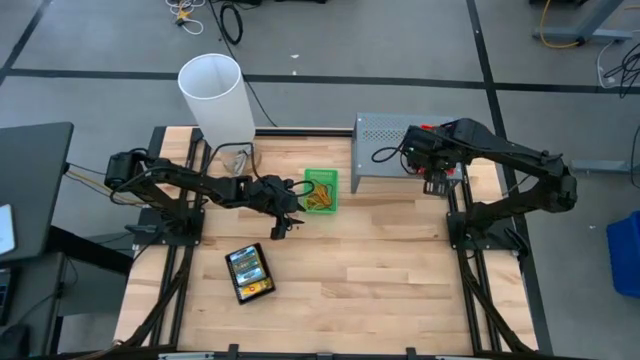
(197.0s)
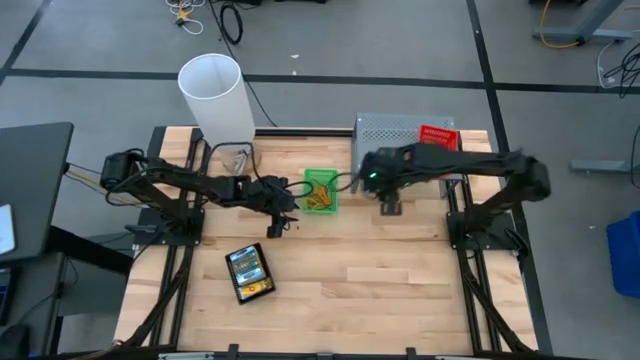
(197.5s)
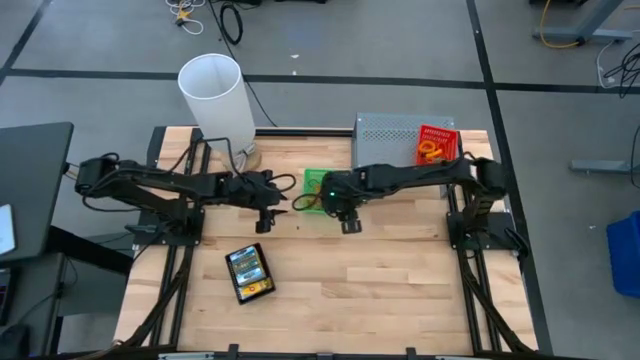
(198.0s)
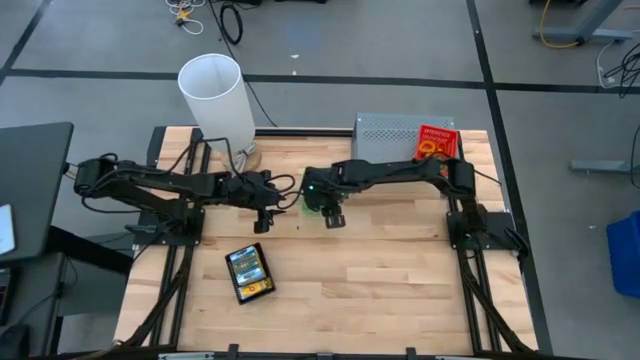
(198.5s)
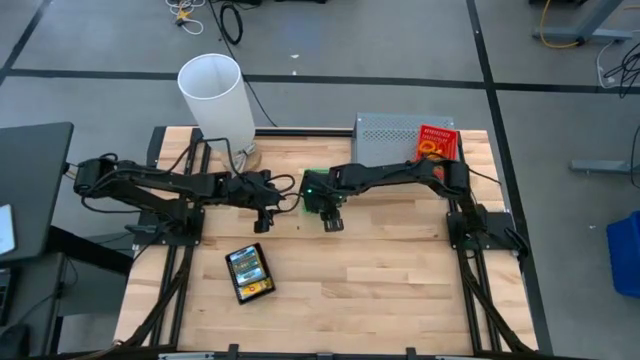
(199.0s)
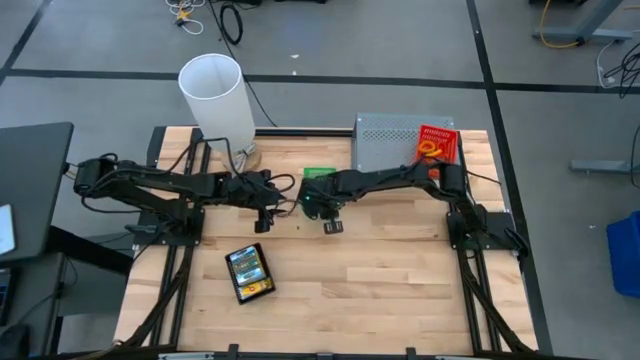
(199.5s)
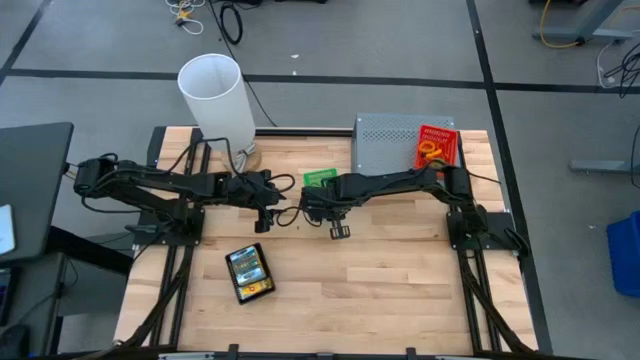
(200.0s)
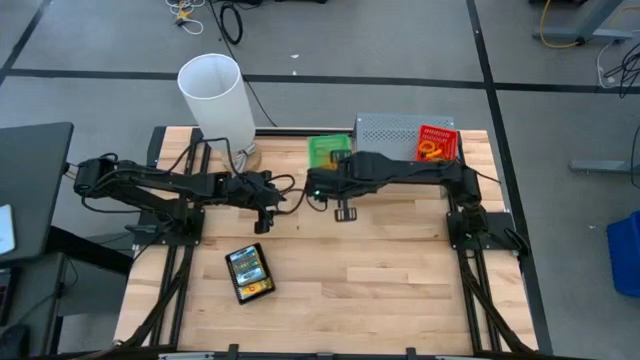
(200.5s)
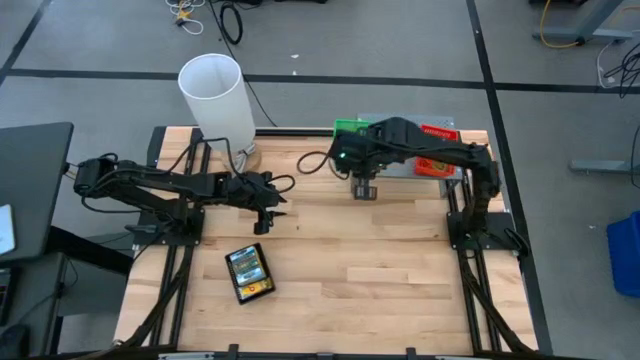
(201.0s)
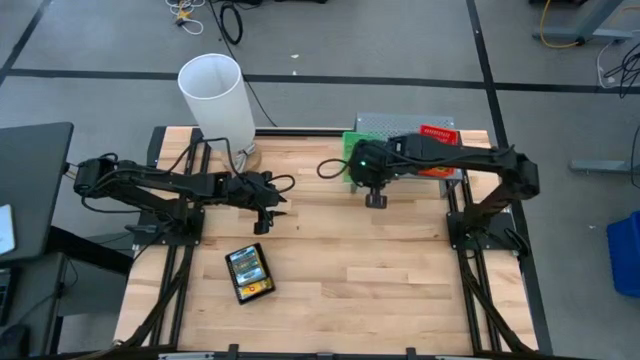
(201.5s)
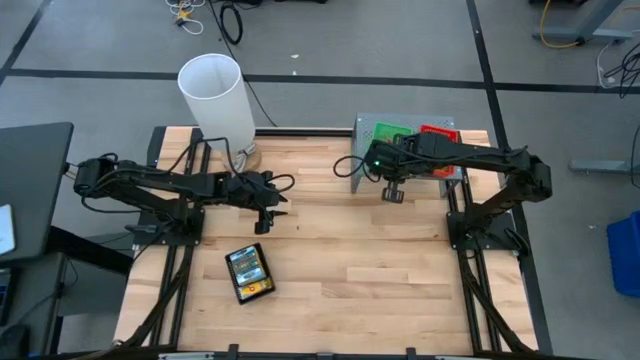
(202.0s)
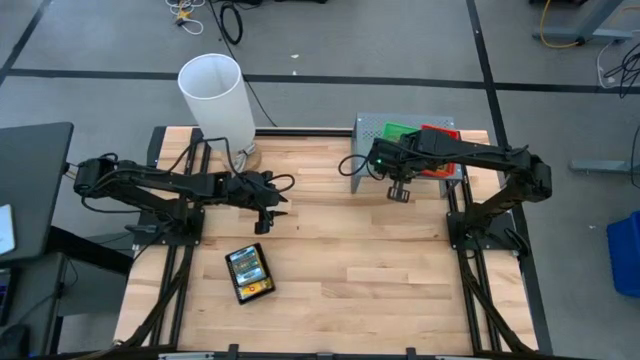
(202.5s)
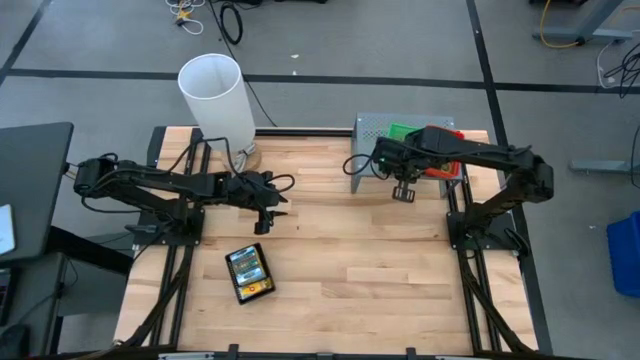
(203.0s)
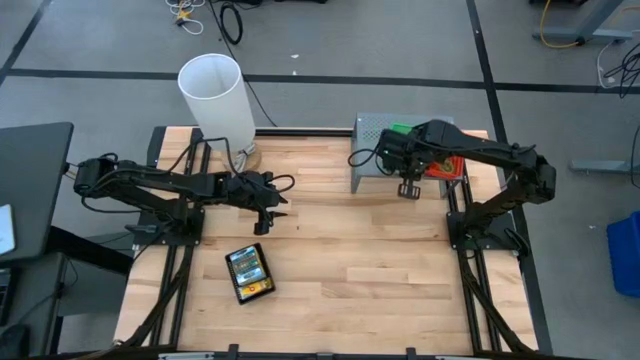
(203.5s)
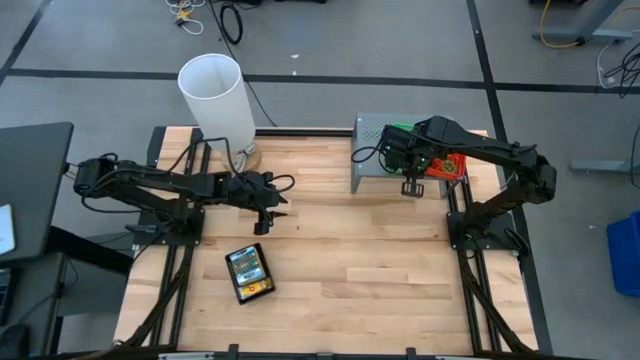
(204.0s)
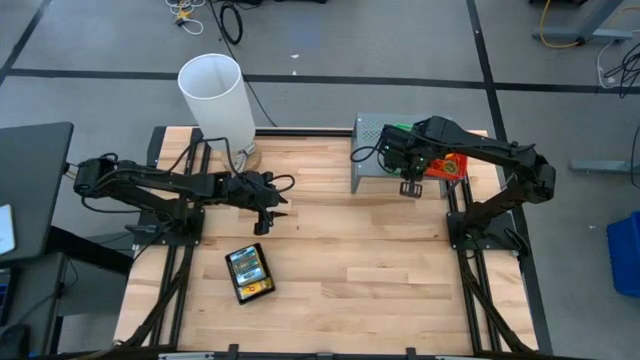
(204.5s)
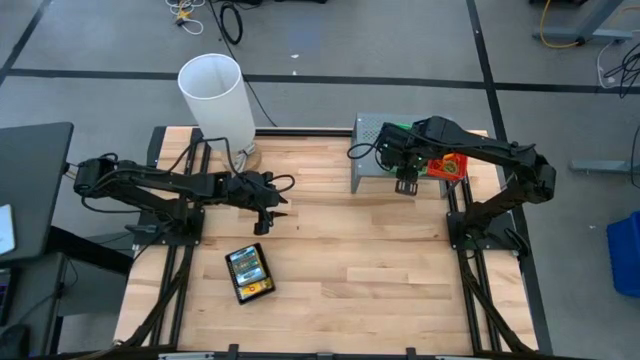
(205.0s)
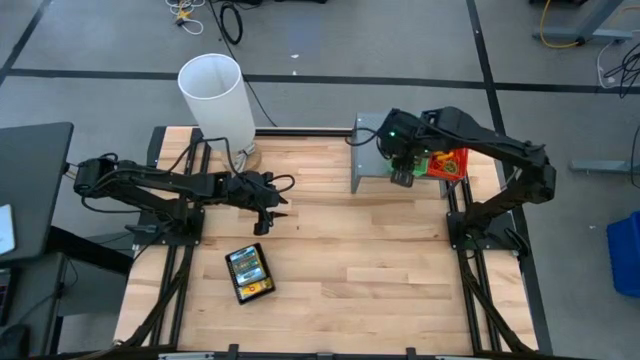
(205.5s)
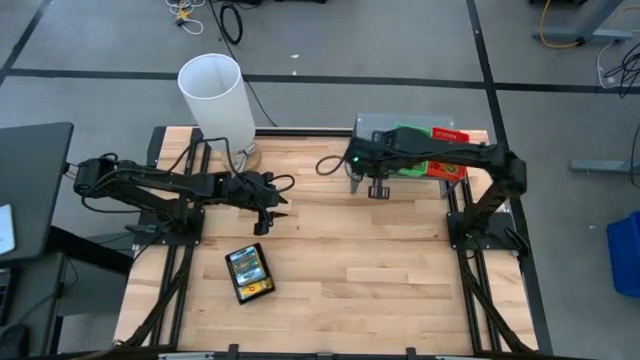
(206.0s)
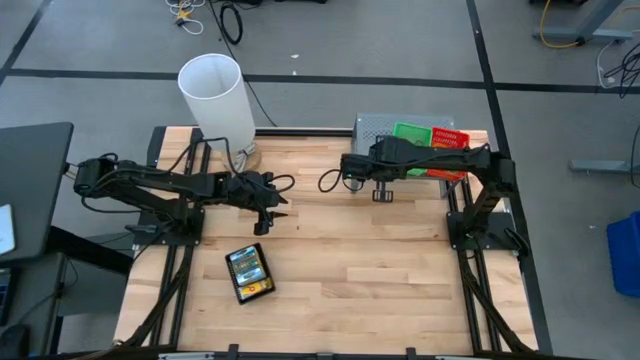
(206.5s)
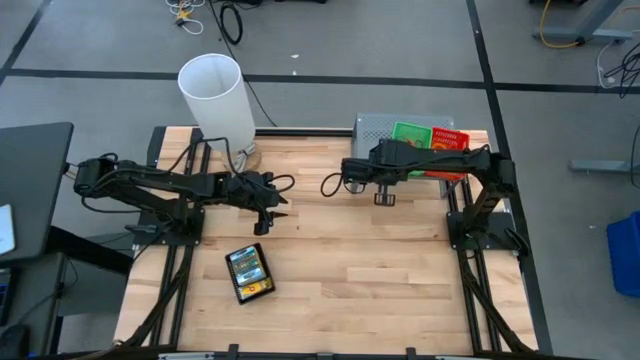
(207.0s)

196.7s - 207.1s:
Task: Pick & Place Office Desk Supplies
Put the green bin on the shelf

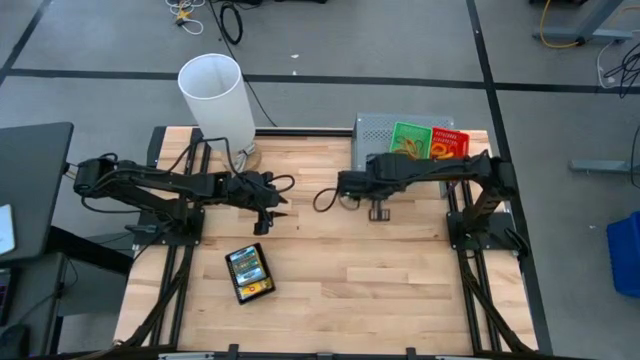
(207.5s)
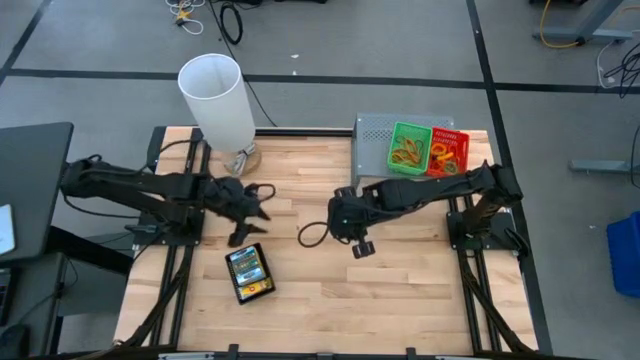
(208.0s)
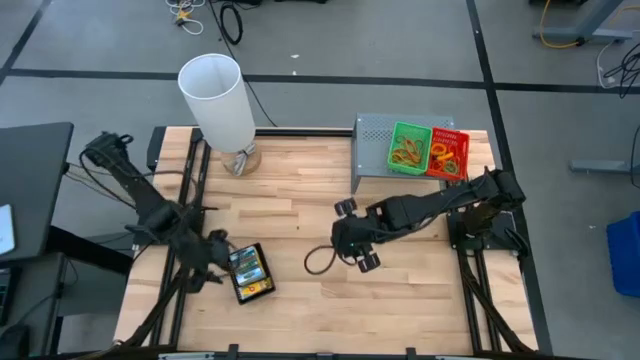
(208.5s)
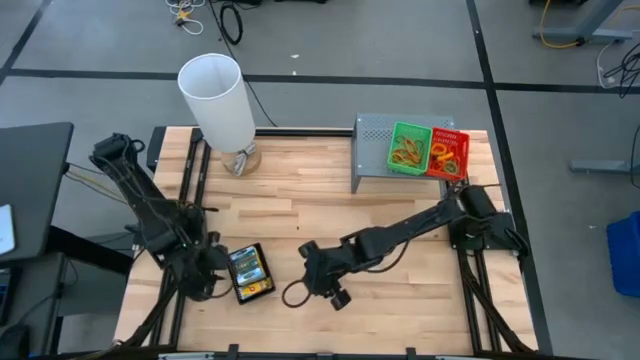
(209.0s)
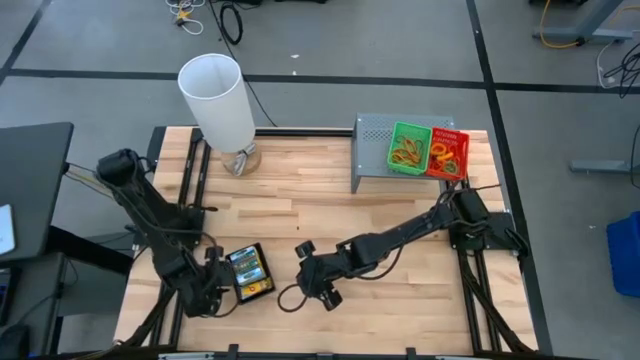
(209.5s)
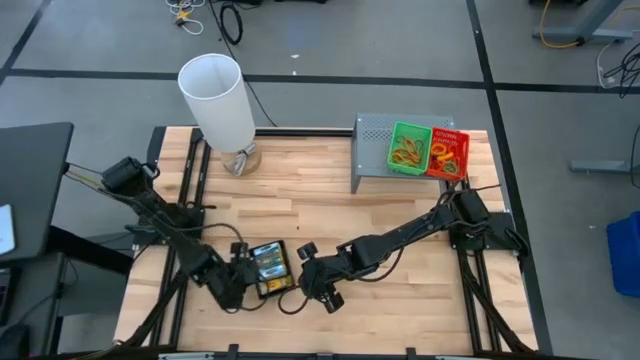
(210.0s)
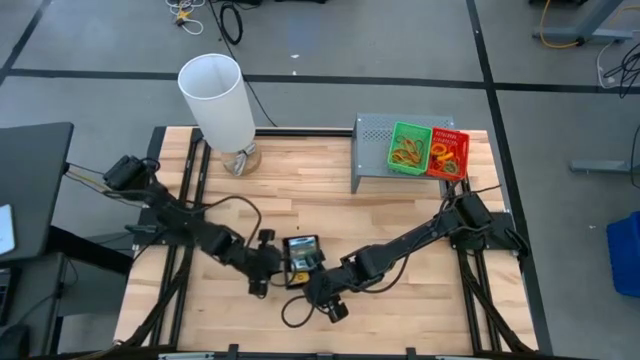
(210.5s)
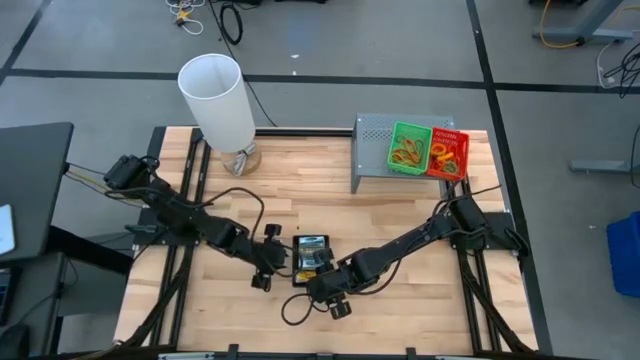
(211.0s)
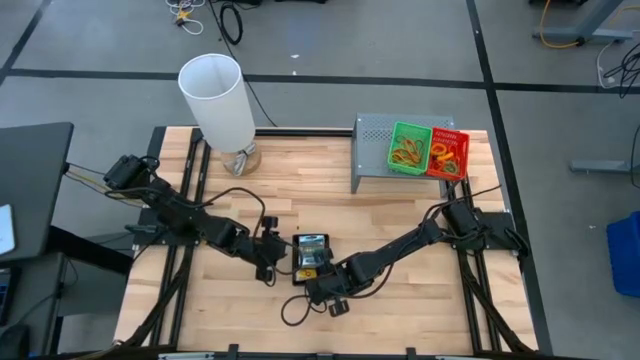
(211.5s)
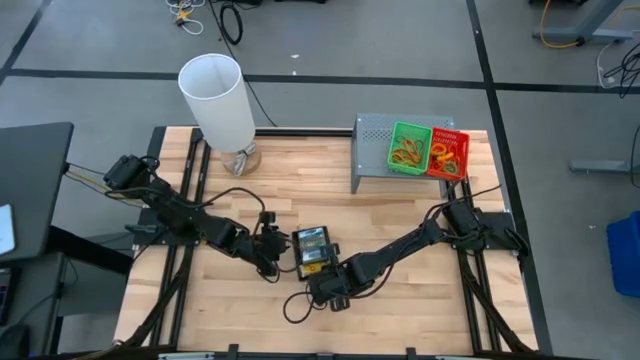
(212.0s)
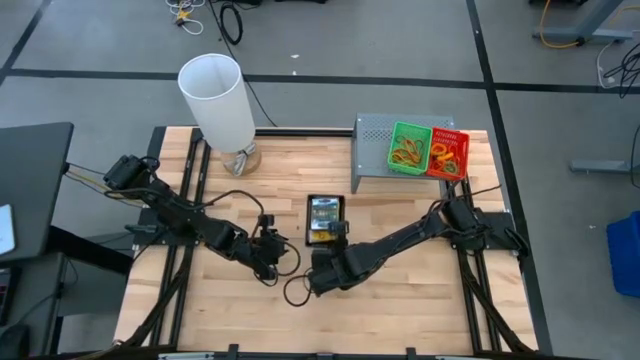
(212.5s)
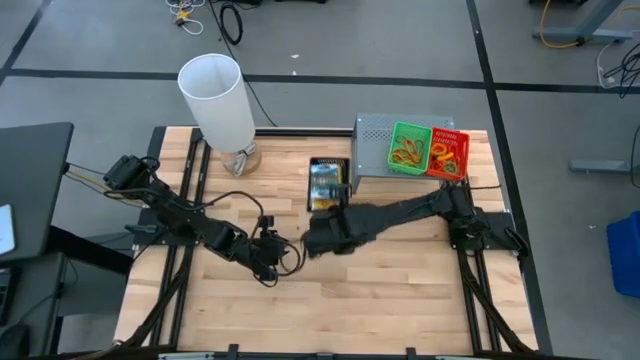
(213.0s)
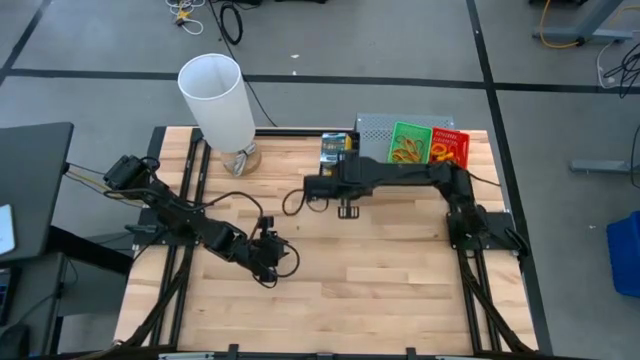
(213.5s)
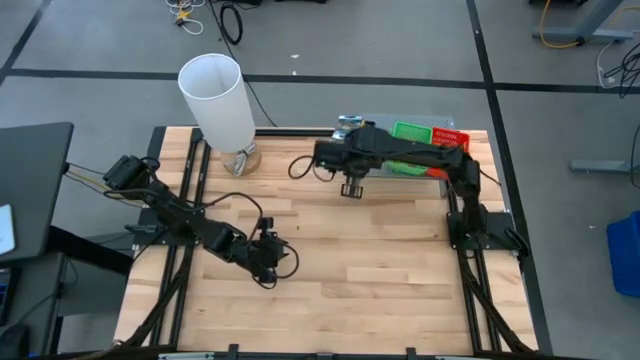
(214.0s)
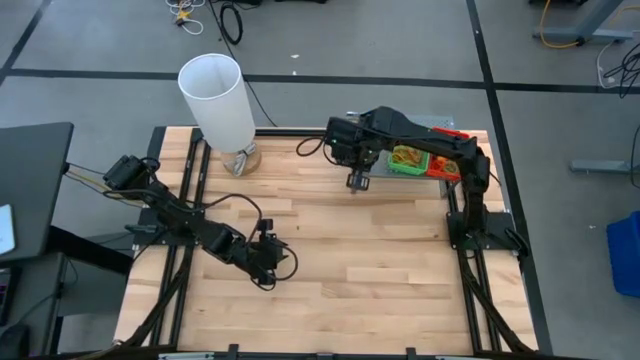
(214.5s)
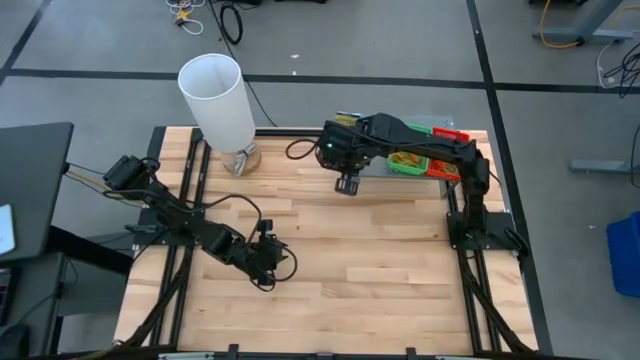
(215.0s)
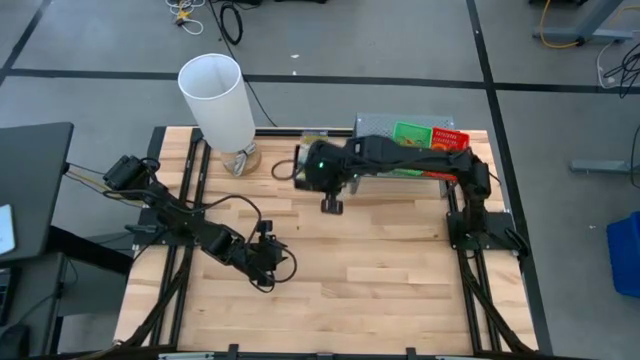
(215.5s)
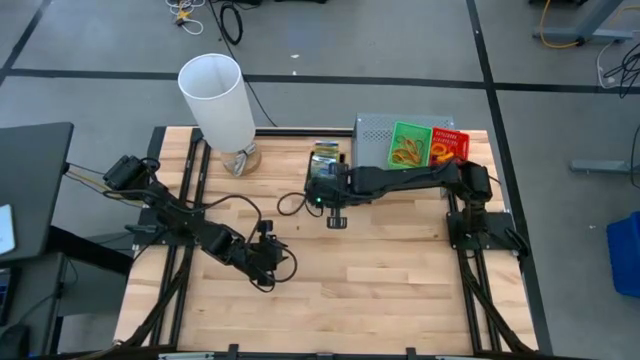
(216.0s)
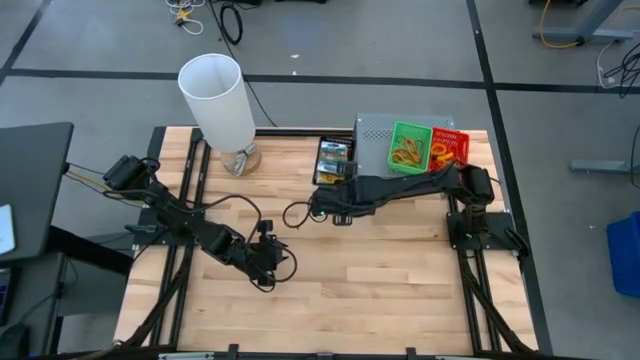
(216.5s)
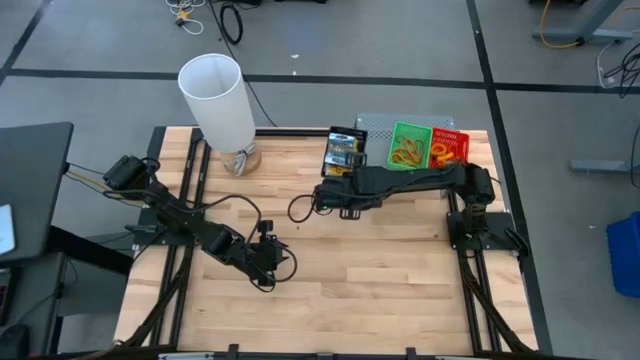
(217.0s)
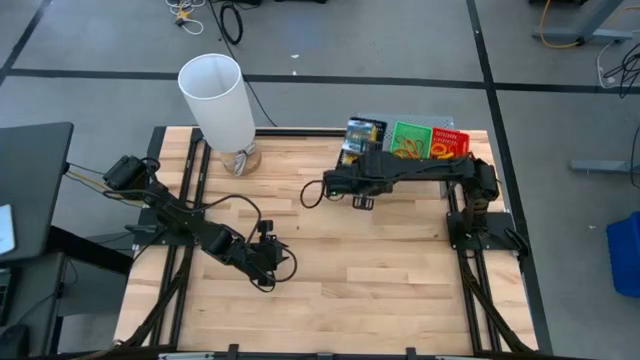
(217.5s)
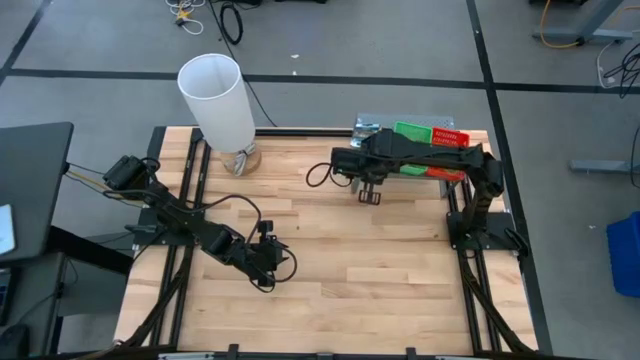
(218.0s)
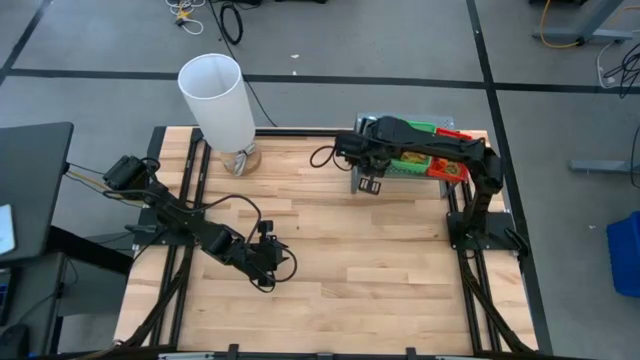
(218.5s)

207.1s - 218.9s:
Put the black bin on the shelf
